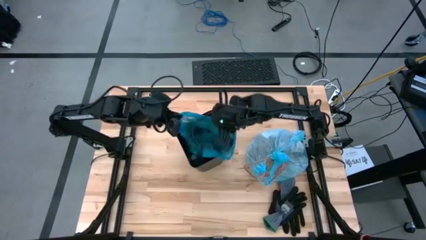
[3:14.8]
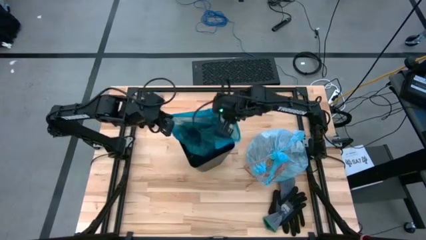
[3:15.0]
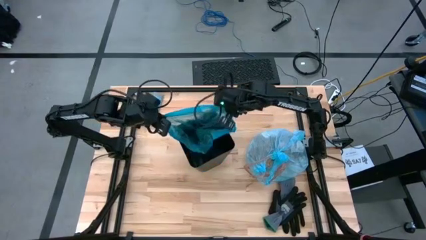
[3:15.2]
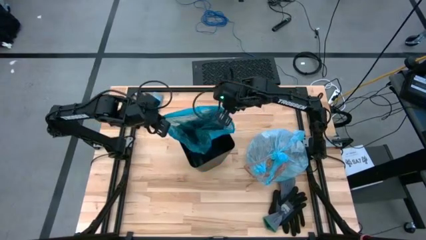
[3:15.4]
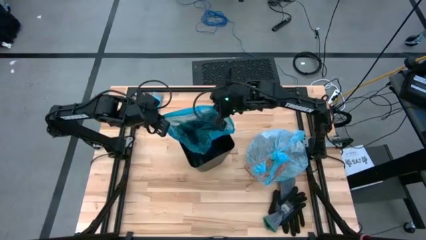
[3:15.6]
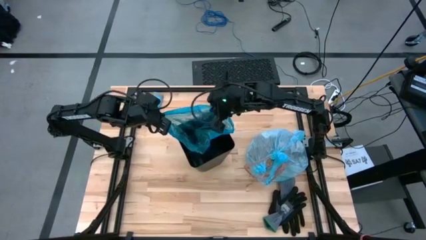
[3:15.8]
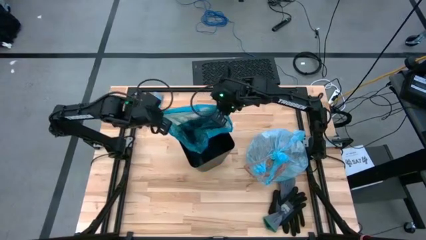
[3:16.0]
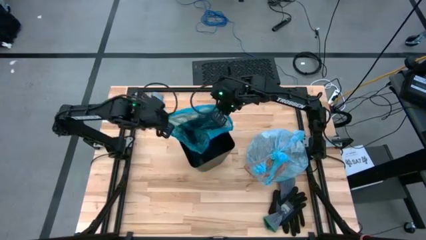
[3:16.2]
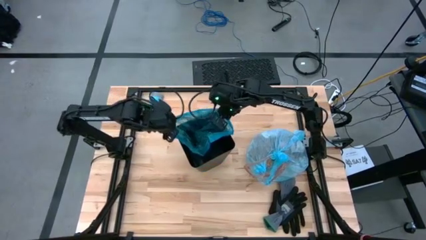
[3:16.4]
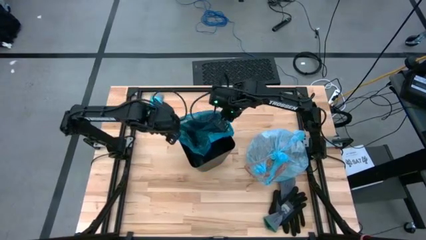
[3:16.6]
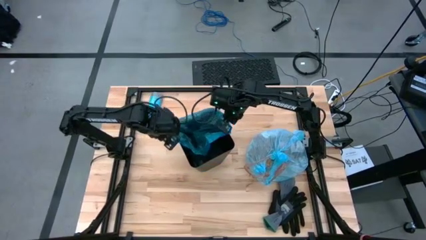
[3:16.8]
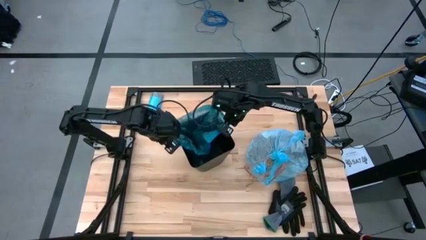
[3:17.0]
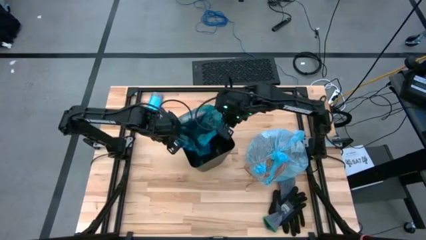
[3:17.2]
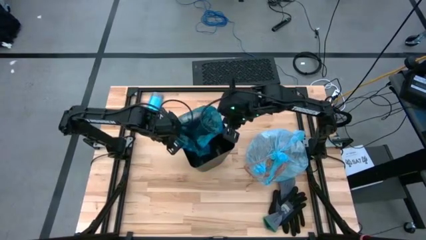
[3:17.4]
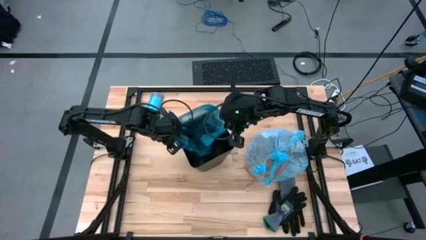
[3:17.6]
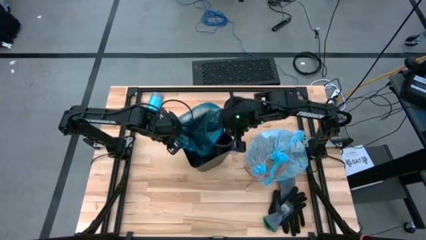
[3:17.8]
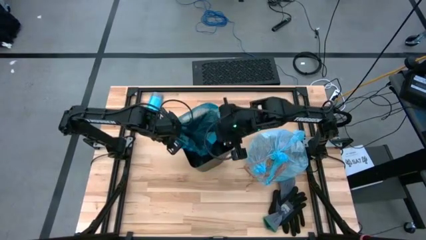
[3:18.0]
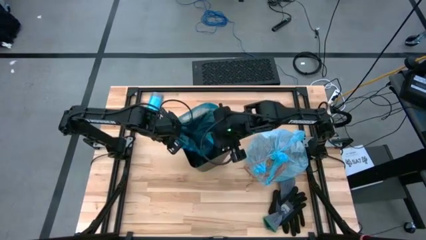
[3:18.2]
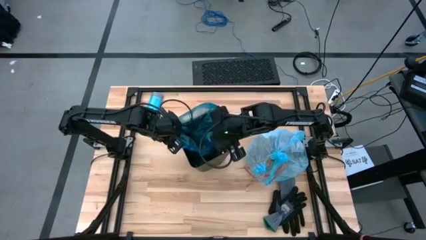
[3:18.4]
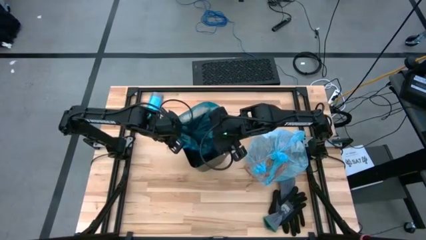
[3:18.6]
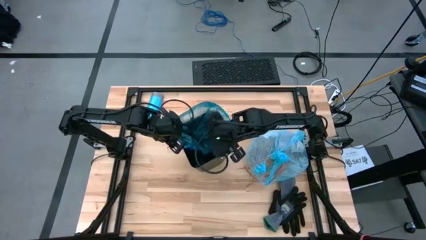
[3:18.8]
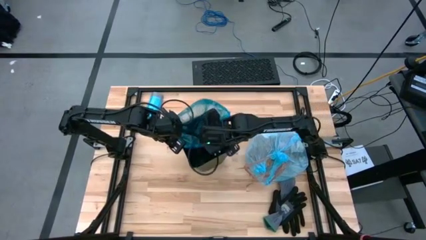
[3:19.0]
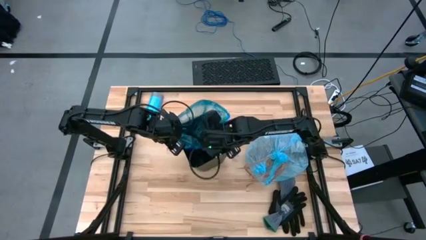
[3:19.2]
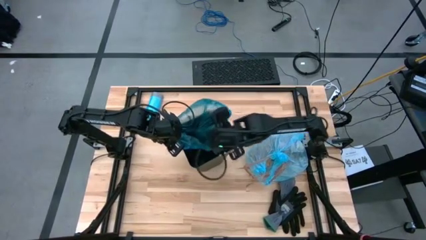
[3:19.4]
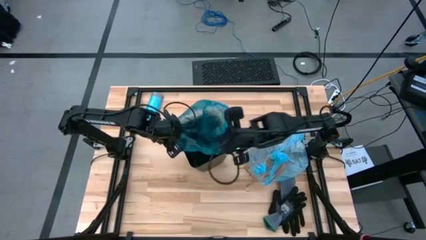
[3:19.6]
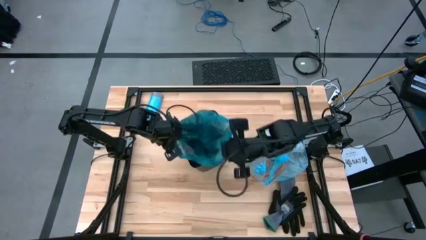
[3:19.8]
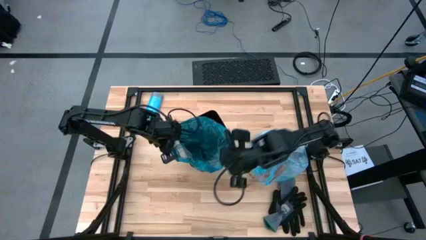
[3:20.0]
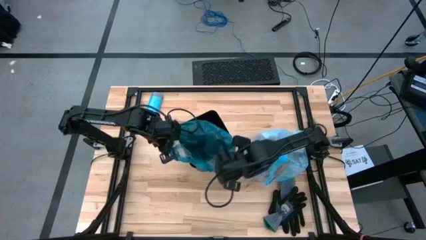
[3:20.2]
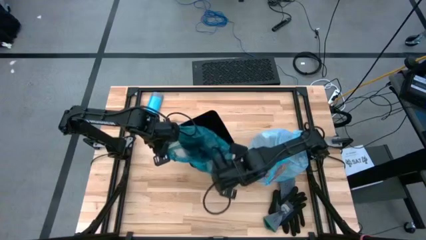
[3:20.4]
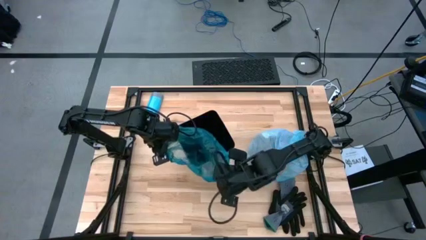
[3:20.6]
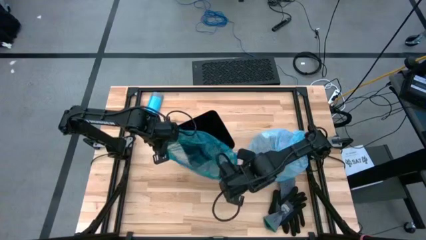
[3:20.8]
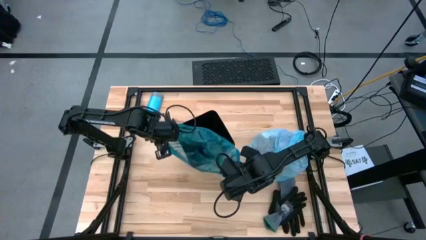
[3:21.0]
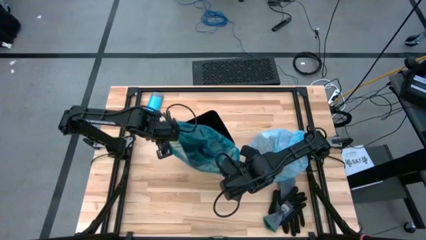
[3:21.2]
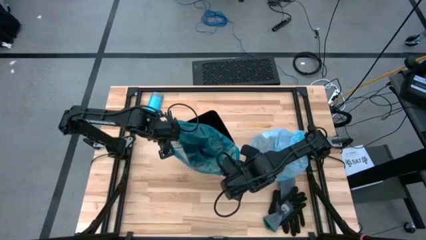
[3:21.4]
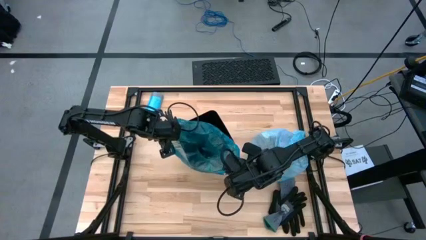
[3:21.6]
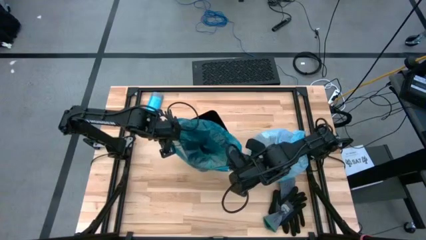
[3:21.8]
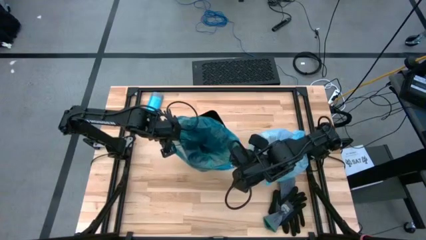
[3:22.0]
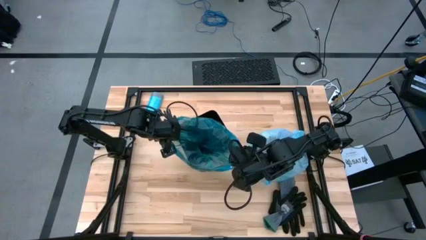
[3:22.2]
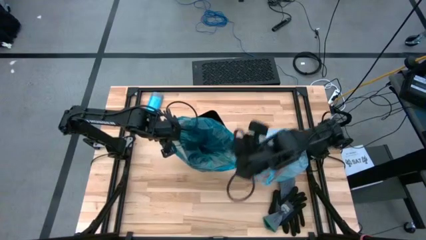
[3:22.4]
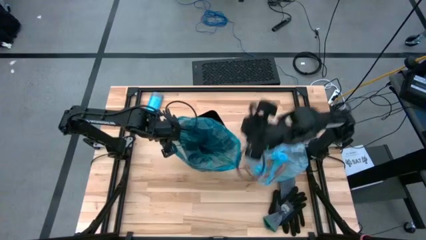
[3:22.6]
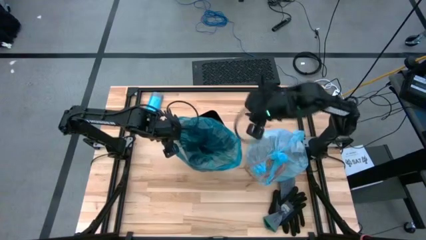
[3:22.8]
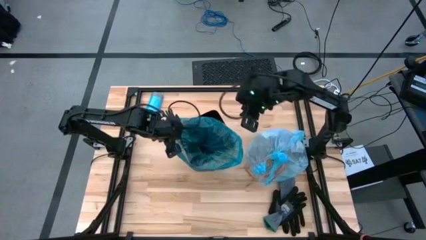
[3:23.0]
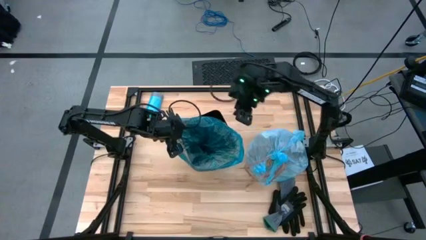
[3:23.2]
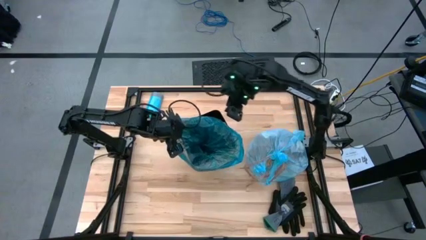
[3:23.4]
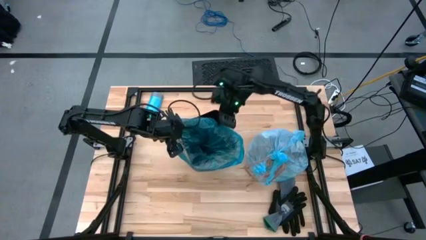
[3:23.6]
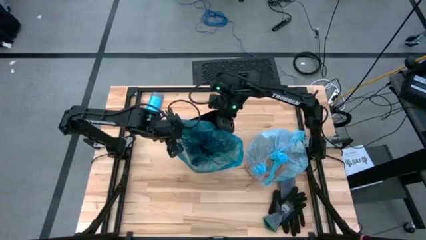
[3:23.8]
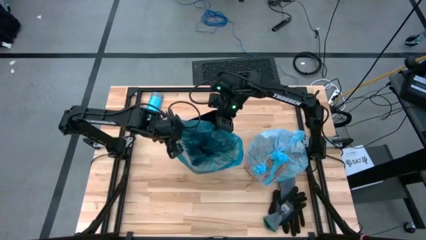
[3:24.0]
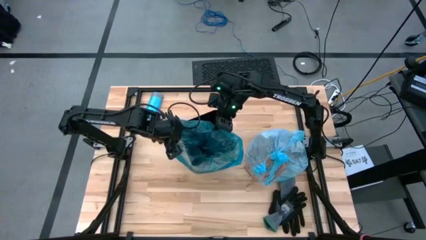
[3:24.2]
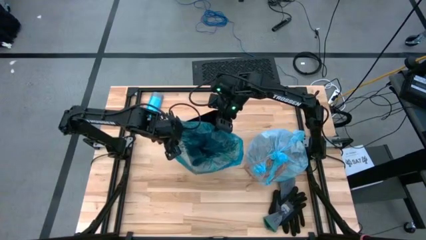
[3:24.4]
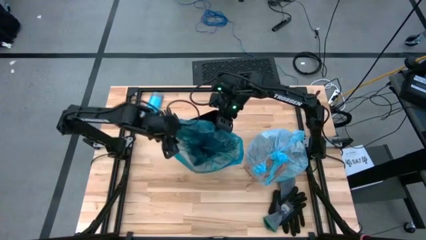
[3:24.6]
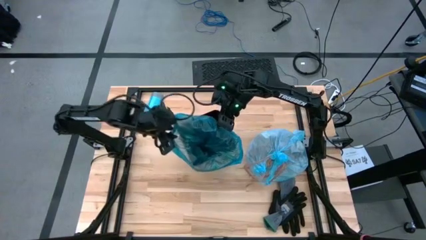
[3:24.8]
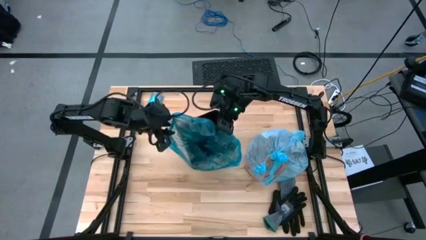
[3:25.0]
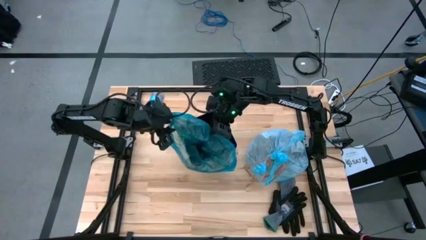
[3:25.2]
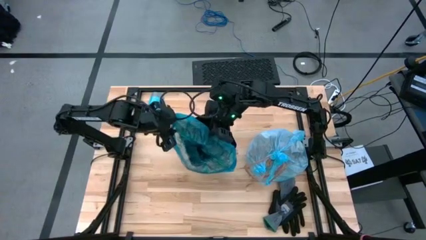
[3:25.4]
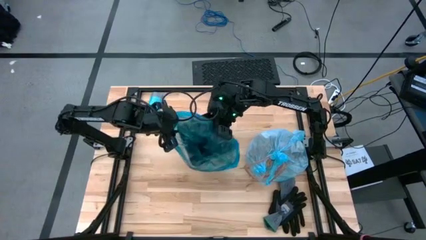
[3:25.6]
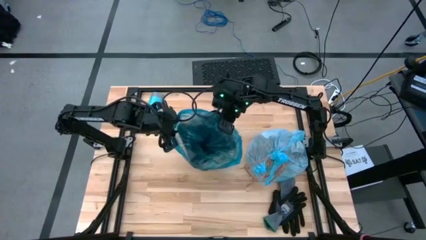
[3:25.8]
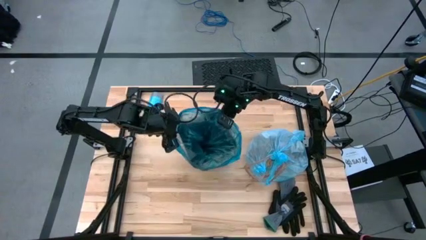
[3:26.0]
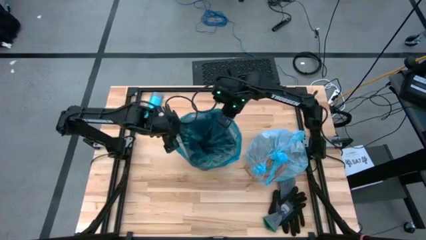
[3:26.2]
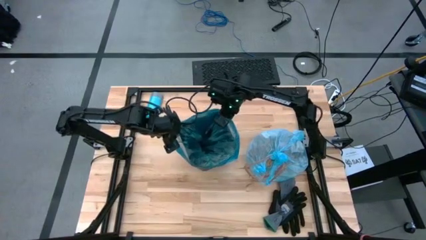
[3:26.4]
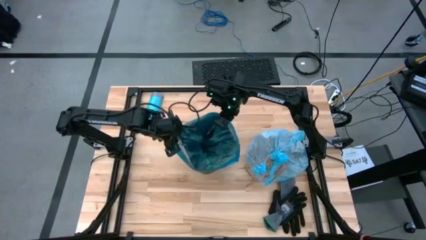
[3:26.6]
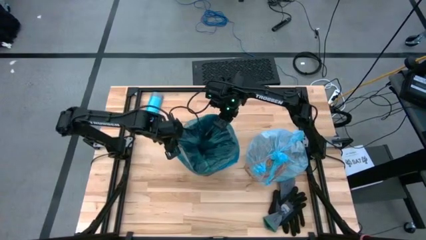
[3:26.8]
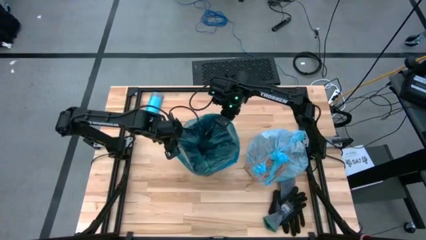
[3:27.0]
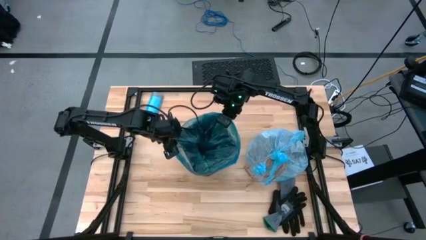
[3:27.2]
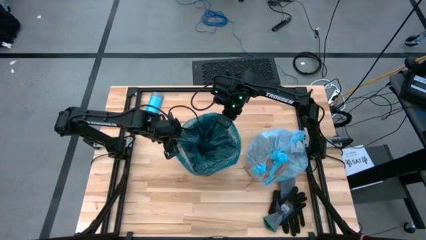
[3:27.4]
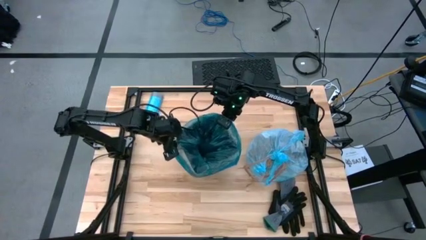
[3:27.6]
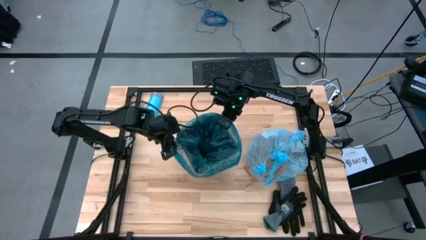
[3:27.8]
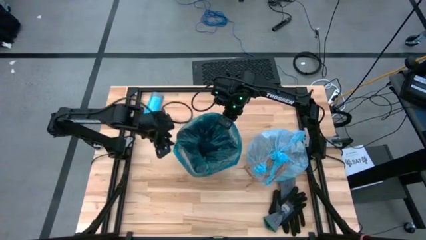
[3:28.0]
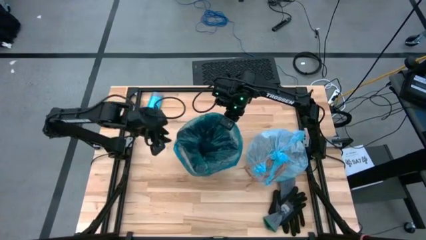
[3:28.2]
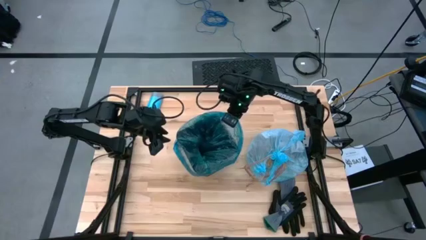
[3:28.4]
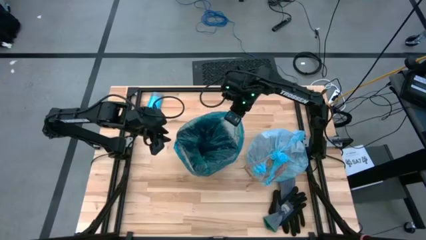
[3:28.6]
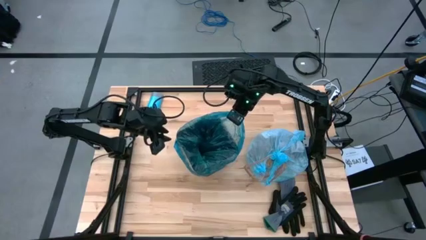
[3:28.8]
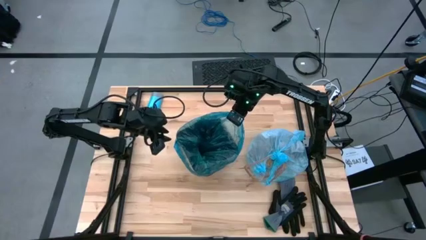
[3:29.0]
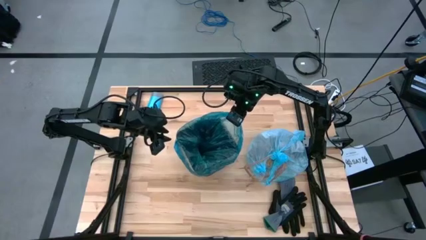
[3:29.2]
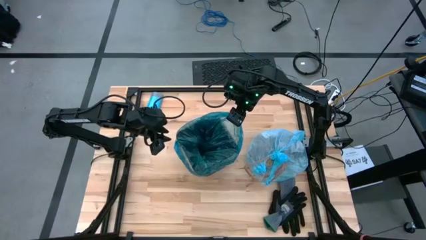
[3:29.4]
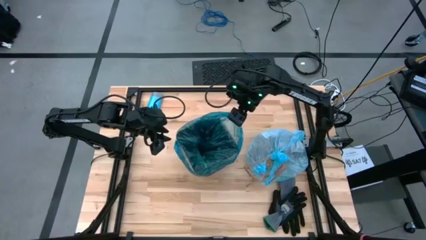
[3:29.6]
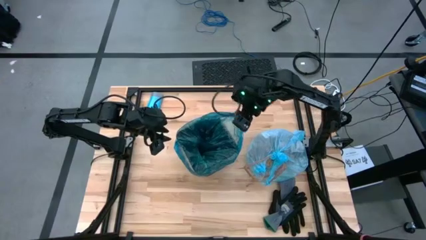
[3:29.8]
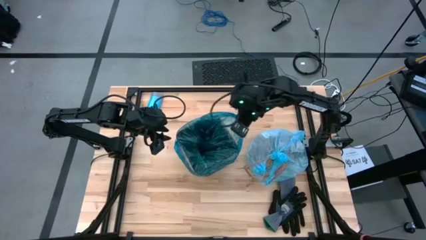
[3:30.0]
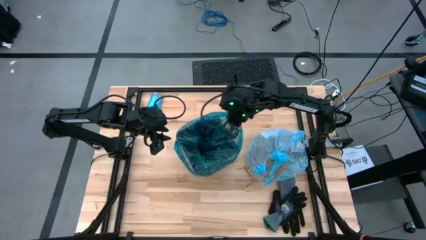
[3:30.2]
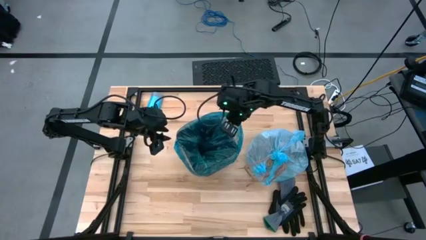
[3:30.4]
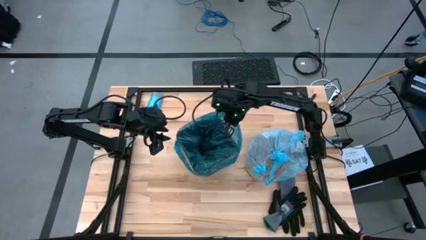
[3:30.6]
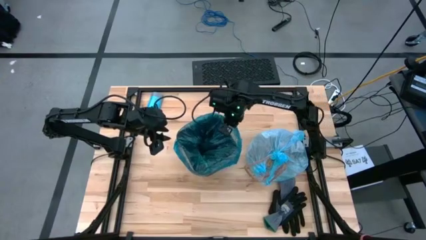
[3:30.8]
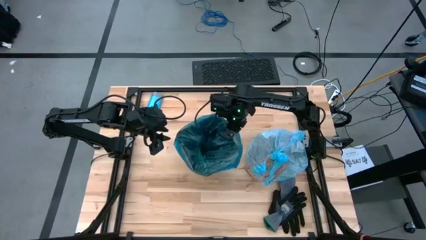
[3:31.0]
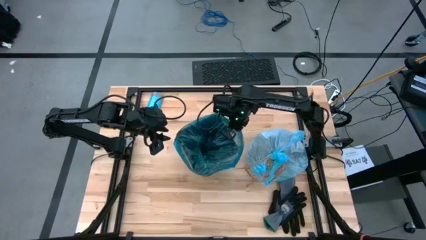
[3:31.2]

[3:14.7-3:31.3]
Task: place trash/remove bag and relplace
Insert a new blue trash bag into the trash bin

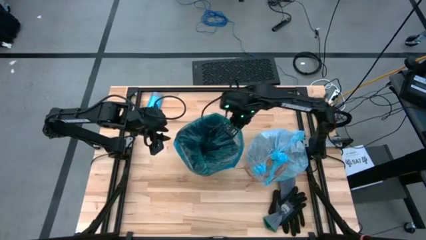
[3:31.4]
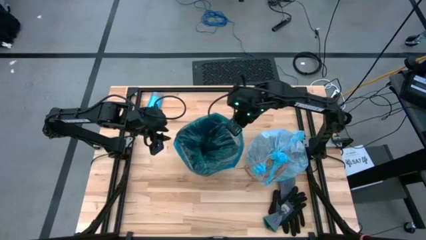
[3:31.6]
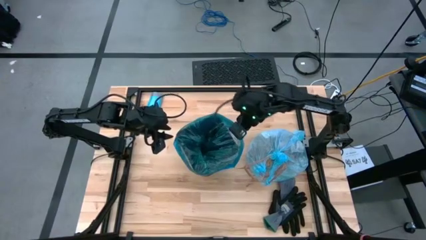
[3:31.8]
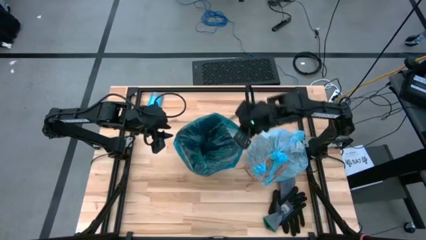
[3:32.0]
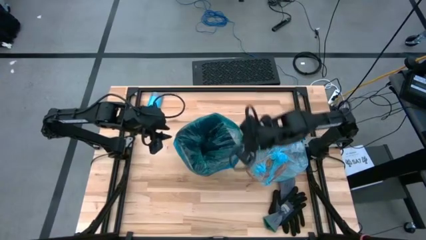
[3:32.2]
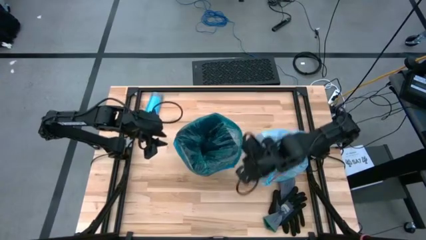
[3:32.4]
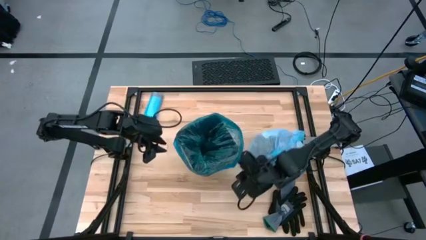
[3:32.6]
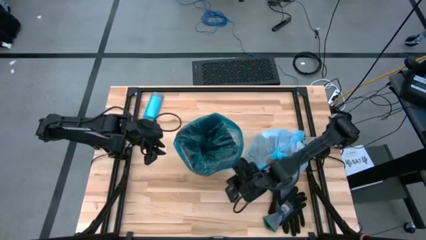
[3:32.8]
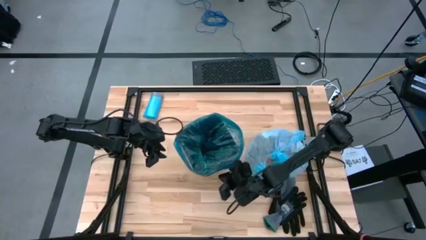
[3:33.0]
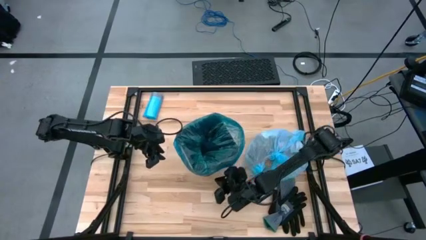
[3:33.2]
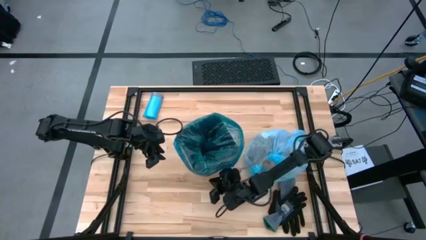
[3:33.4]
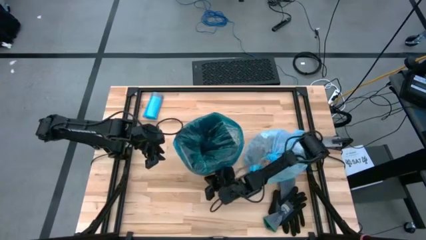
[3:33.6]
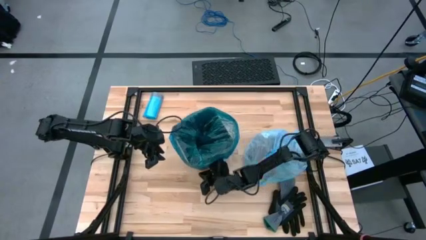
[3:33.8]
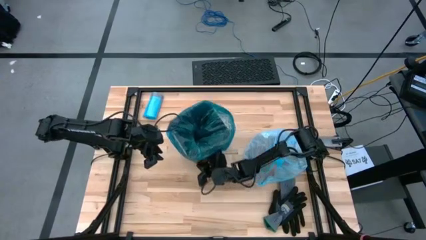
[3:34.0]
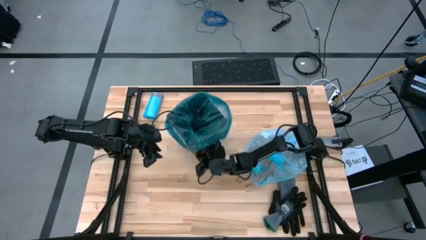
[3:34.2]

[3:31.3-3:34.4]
Move the trash bin to the top of the table
